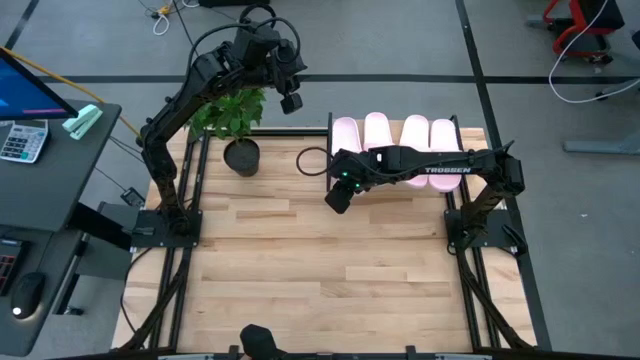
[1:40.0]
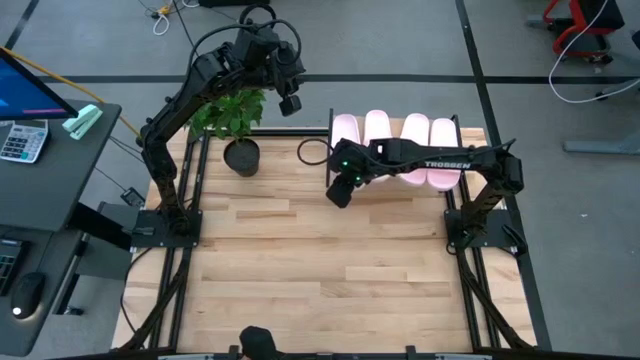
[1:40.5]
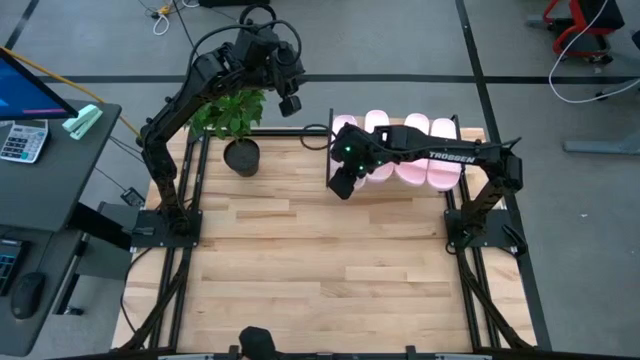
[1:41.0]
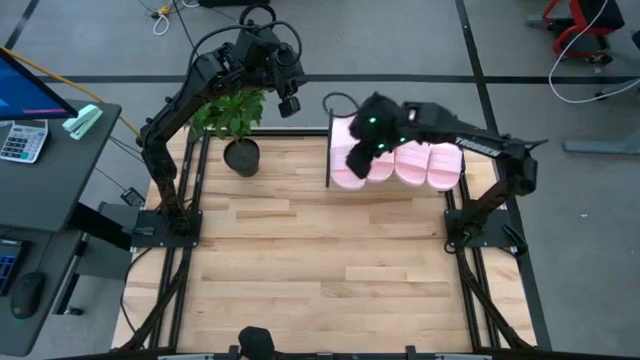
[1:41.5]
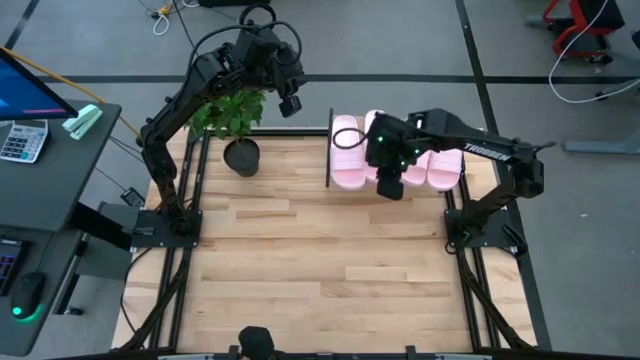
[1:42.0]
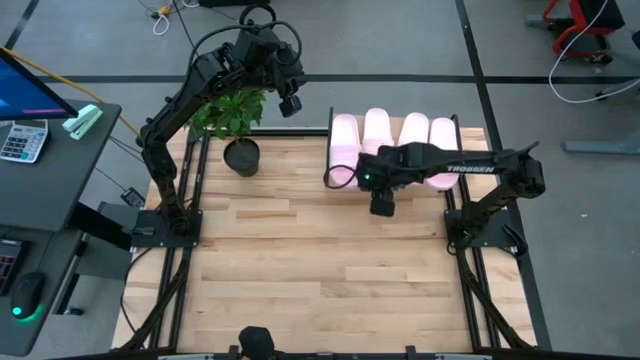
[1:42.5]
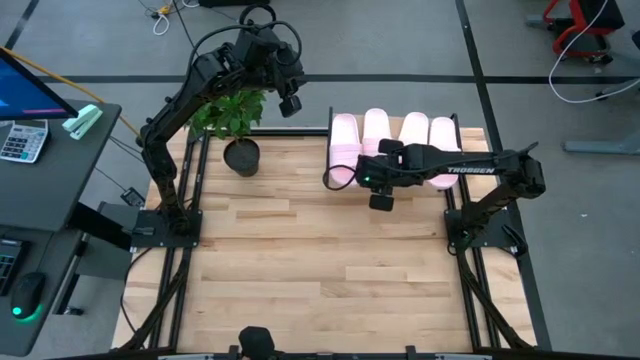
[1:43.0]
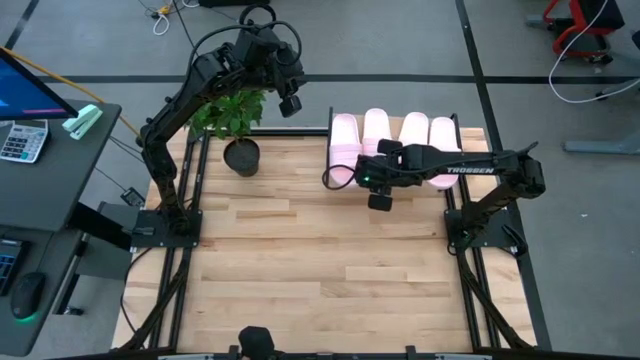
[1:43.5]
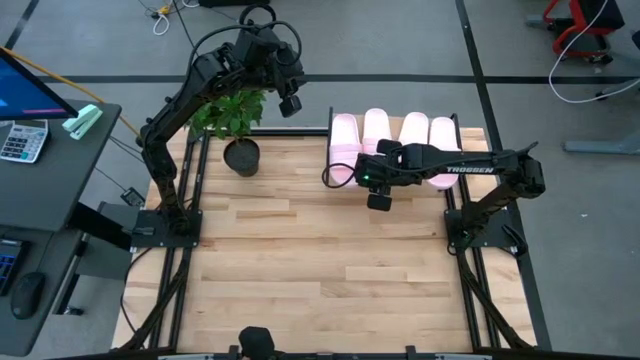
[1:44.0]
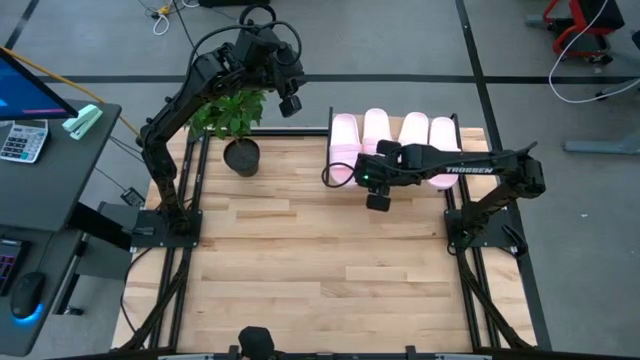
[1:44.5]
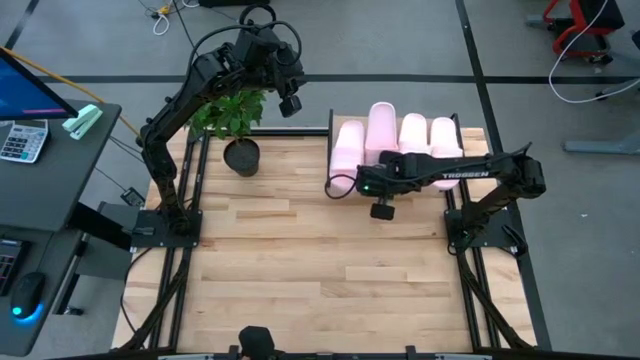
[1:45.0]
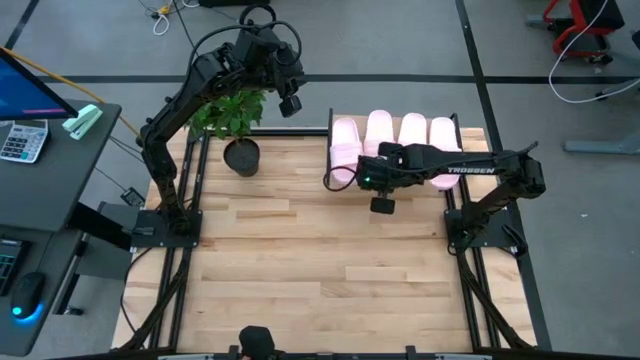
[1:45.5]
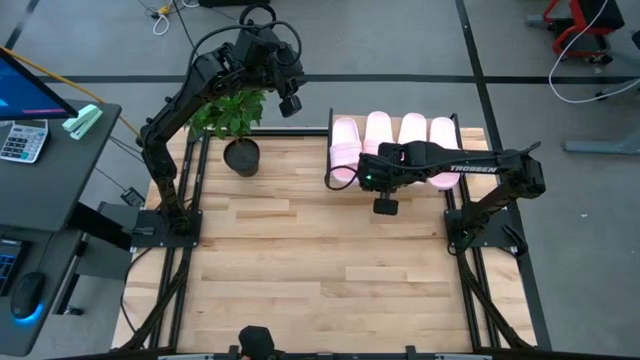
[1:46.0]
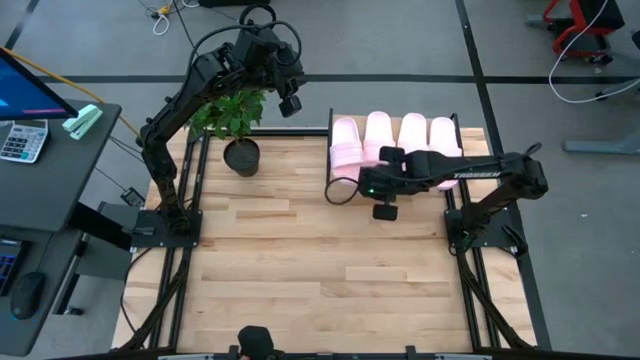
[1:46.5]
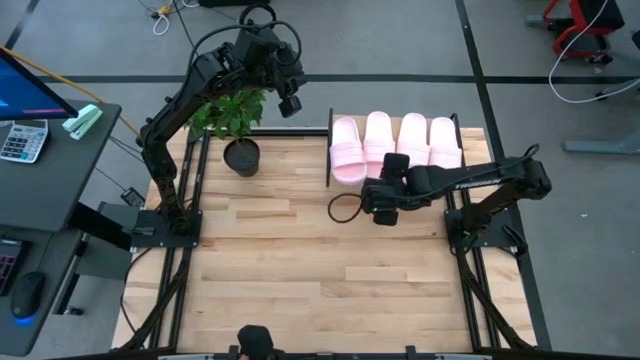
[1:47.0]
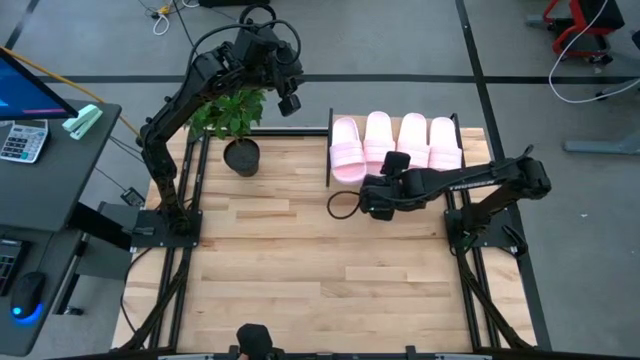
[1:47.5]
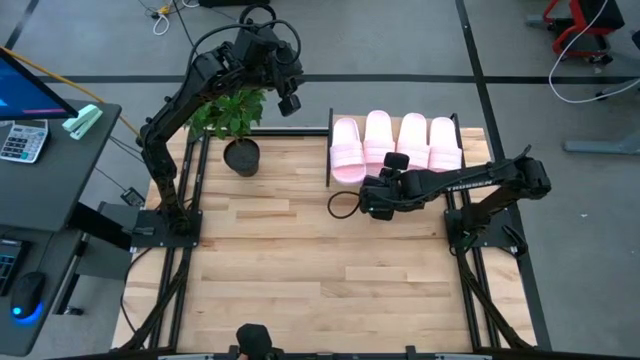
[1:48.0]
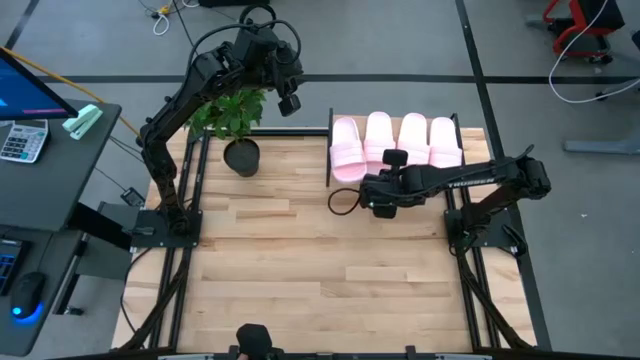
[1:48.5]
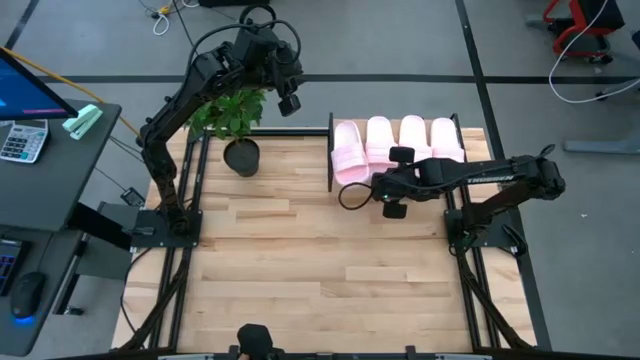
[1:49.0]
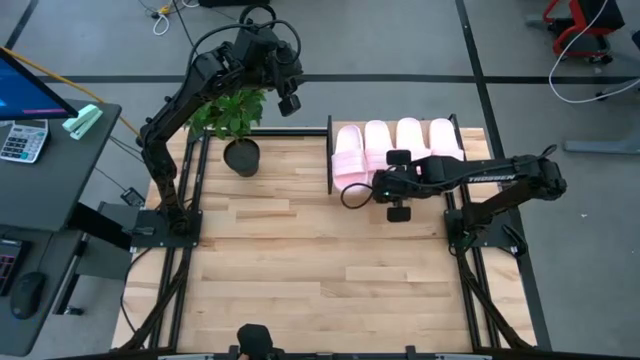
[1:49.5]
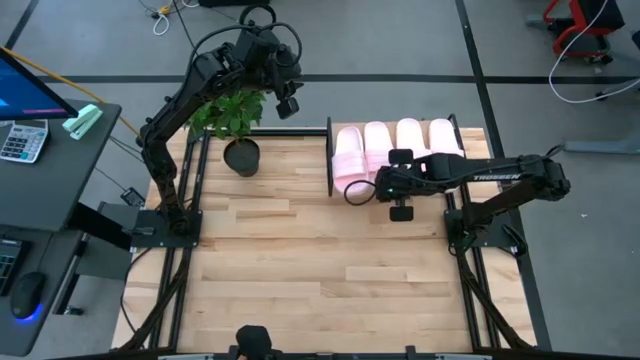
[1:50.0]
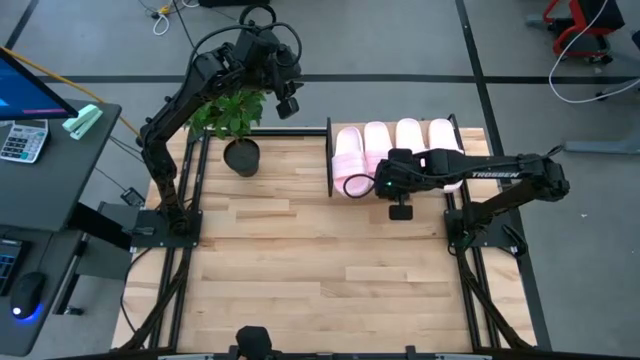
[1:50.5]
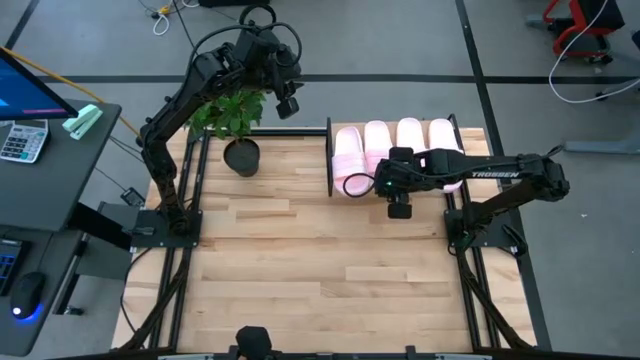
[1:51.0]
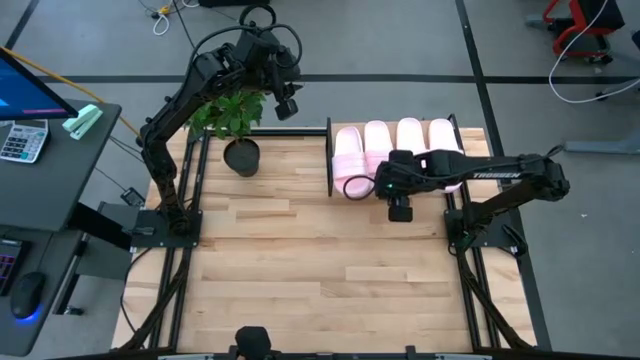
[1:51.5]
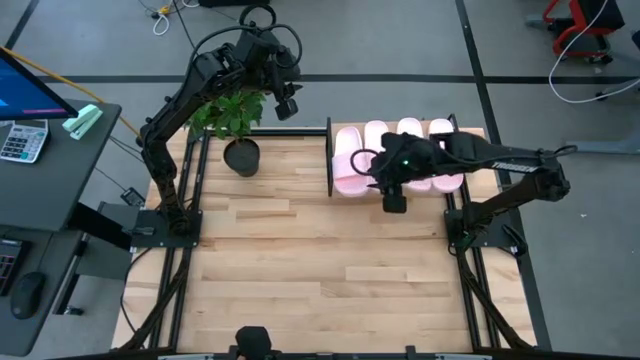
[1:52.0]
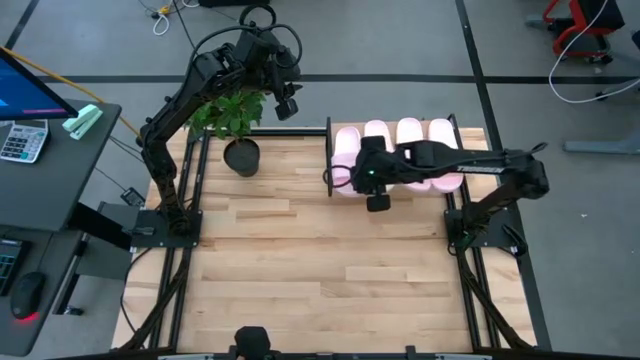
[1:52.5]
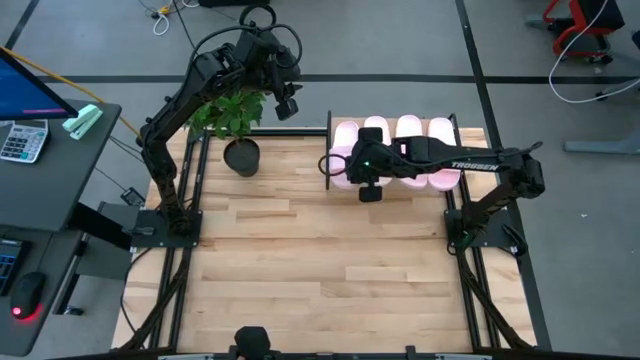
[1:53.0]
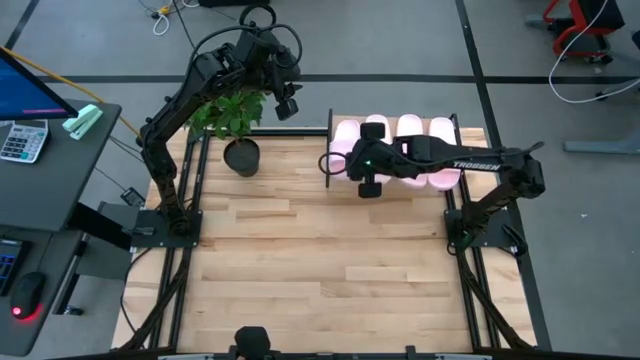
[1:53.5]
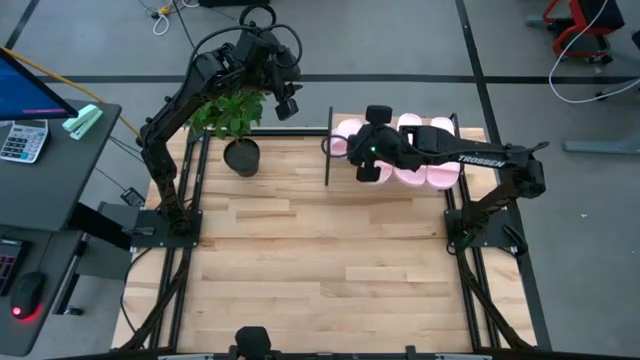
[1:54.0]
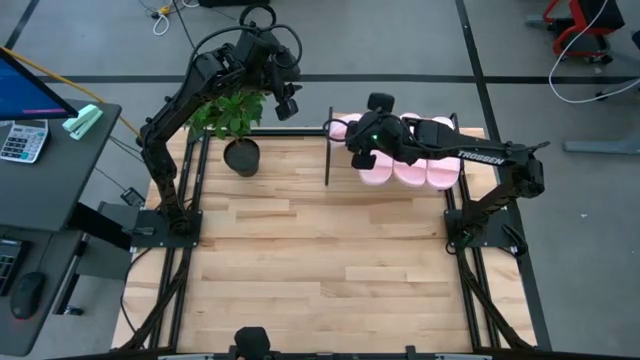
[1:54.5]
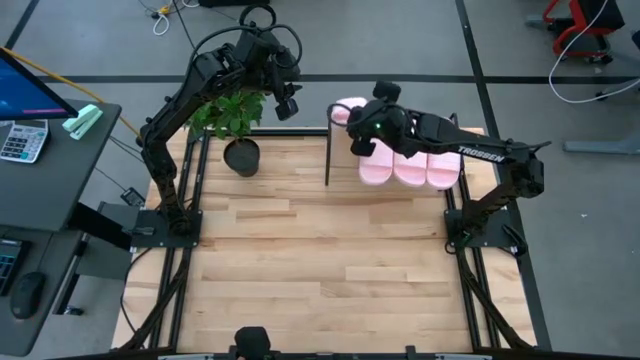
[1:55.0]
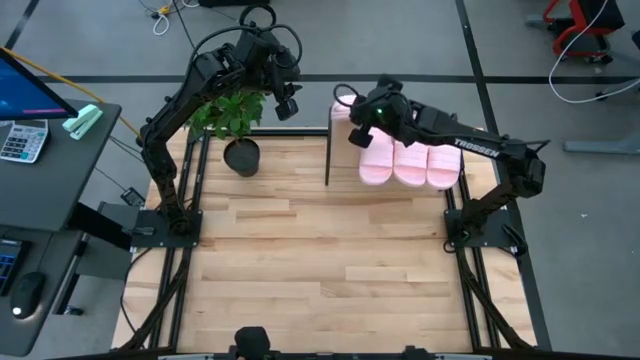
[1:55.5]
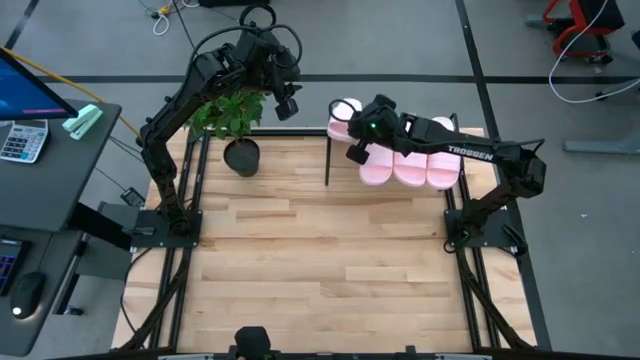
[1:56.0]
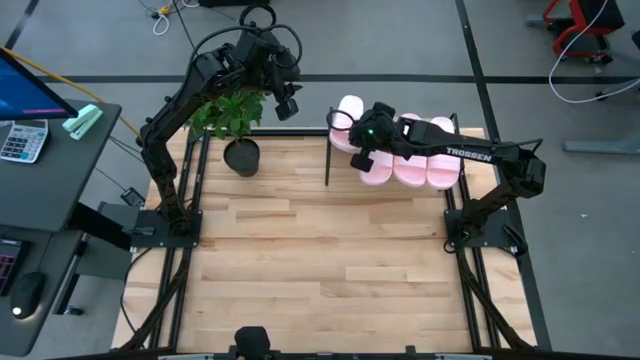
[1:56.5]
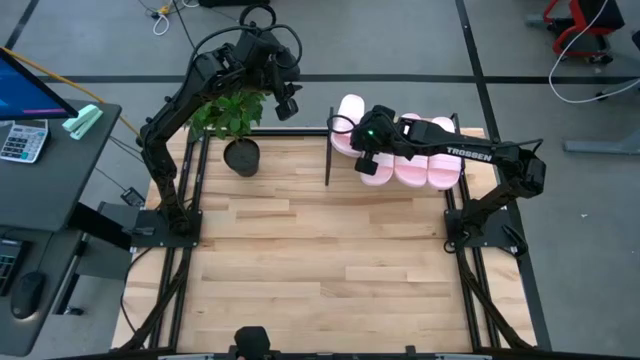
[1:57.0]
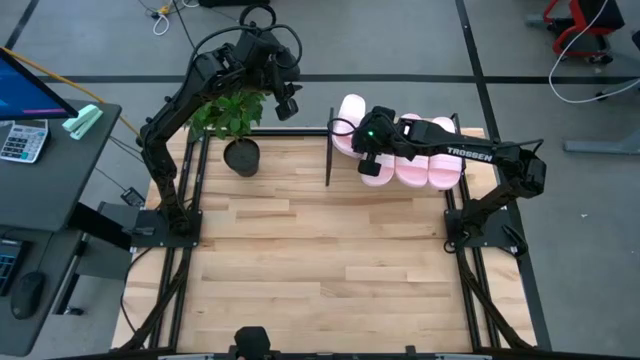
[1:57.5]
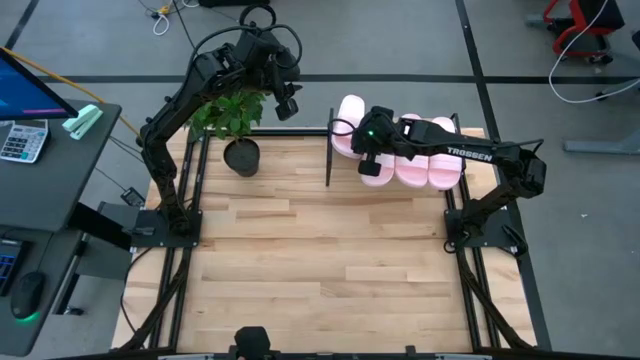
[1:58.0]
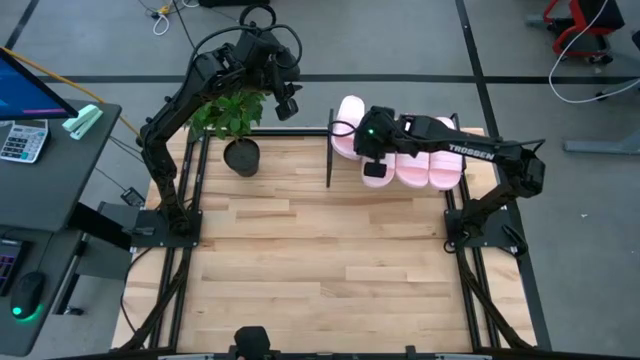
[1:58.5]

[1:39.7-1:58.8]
Task: Pick and place slides into the shelf
Adjust the pink slides on the shelf

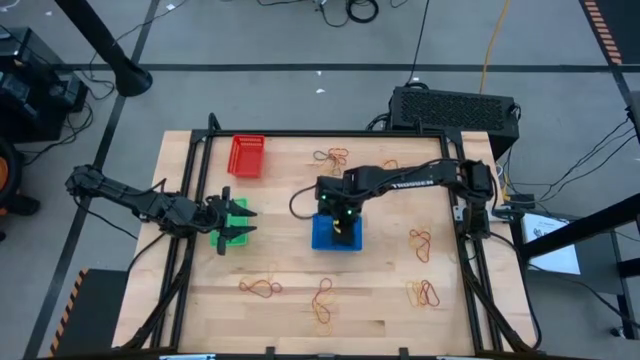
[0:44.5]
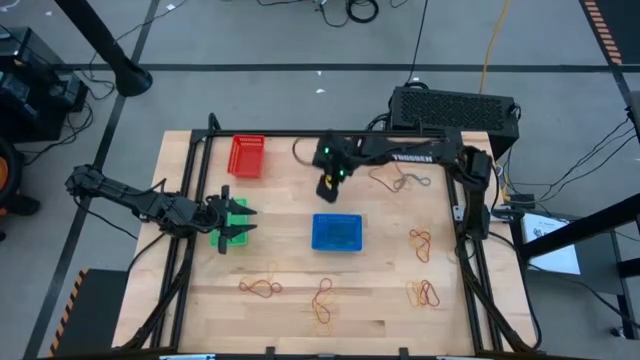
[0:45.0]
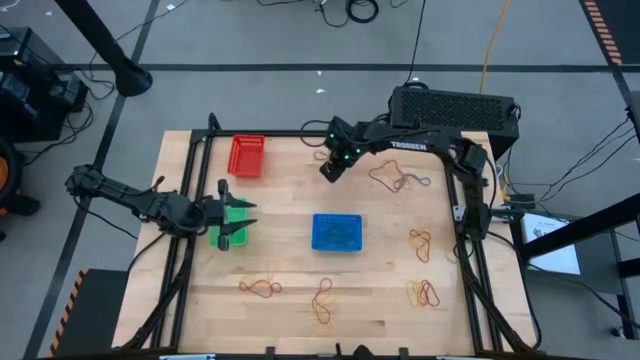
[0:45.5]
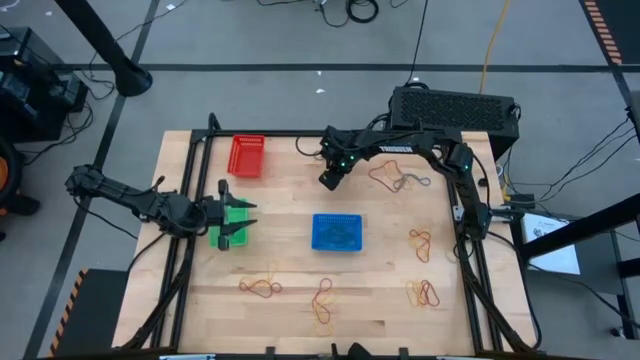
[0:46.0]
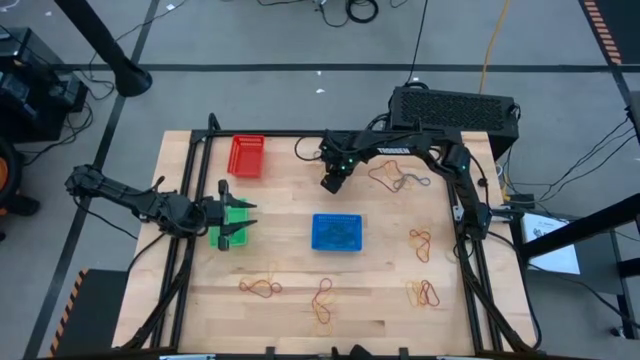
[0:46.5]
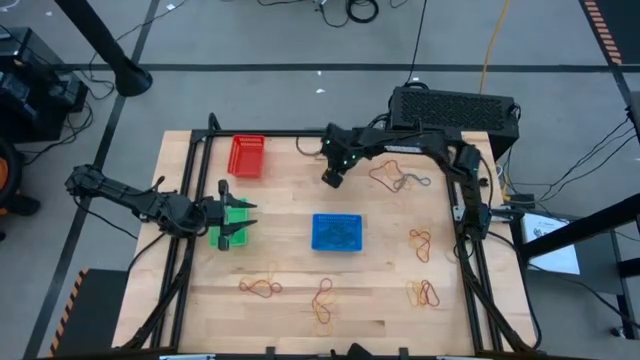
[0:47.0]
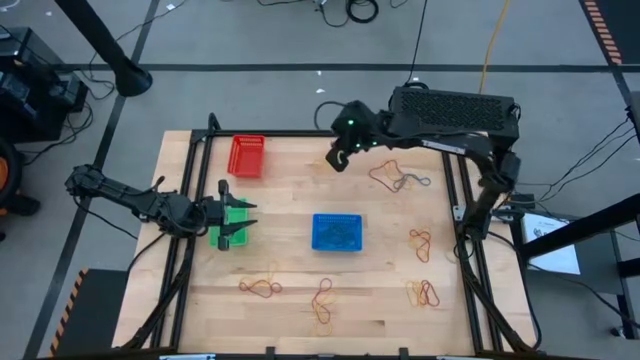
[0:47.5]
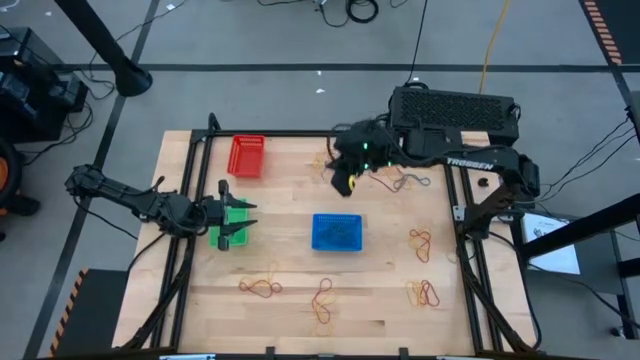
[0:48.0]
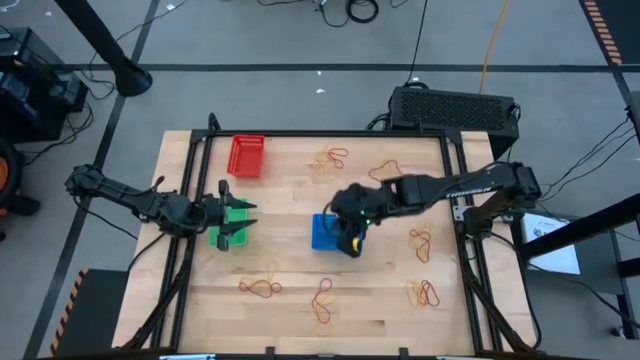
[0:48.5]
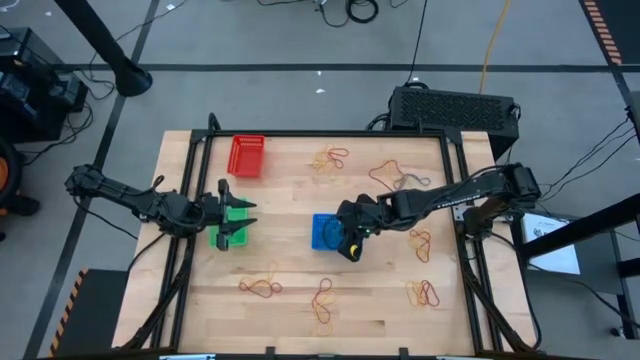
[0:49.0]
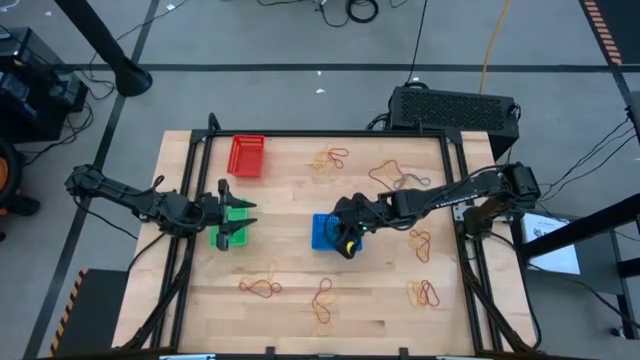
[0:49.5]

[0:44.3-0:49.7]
Task: Sort rubber bands into baskets
Put the blue rubber band into the blue bin
